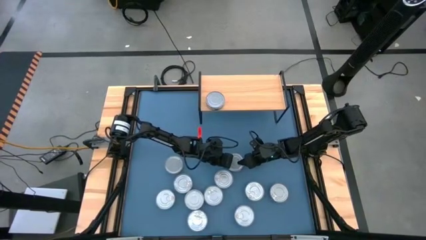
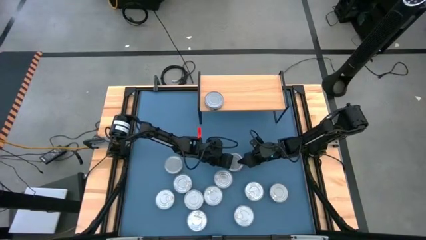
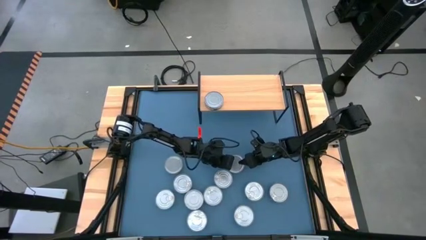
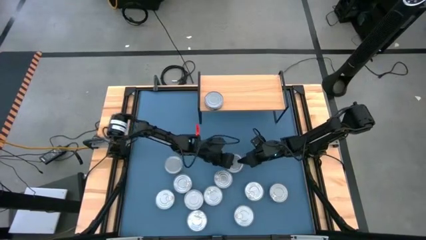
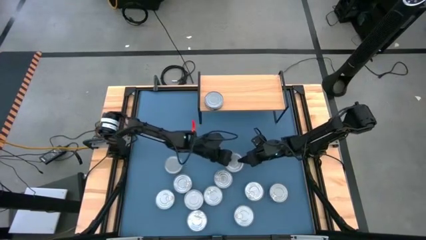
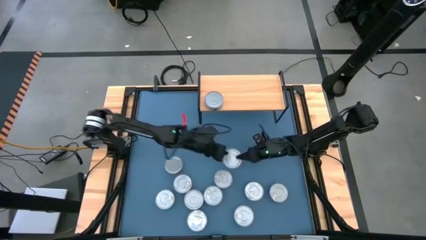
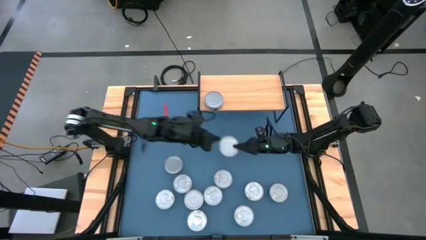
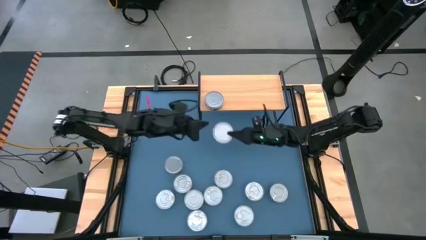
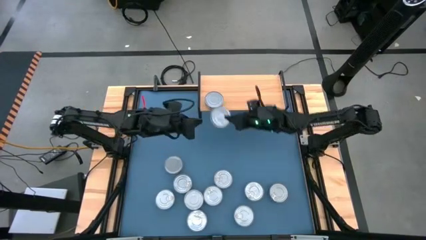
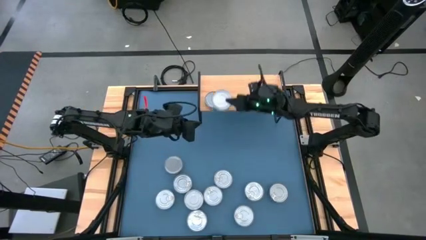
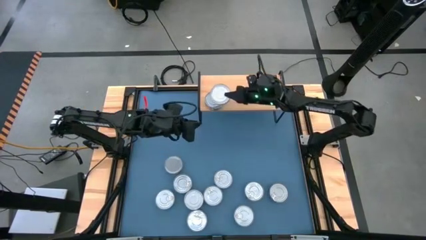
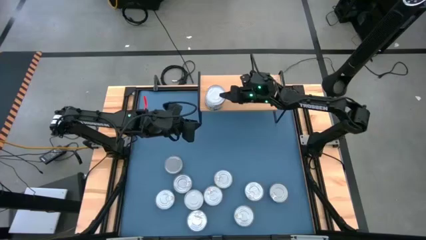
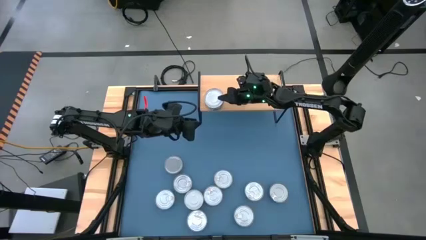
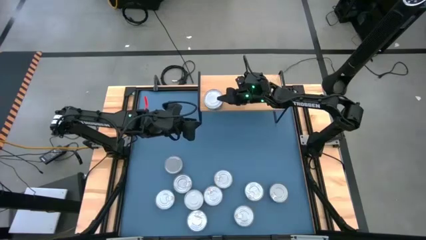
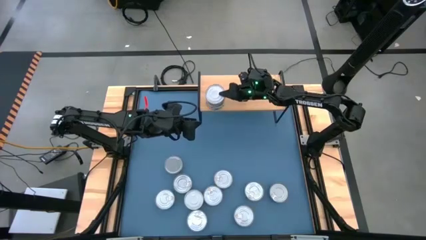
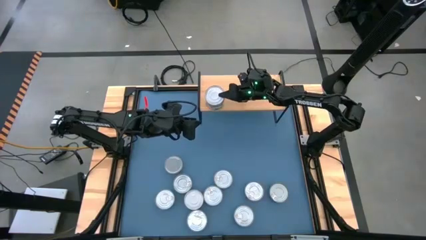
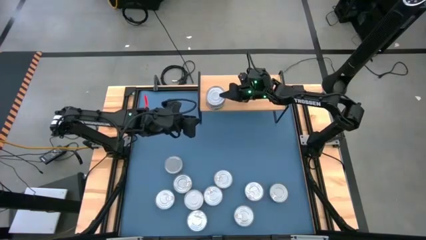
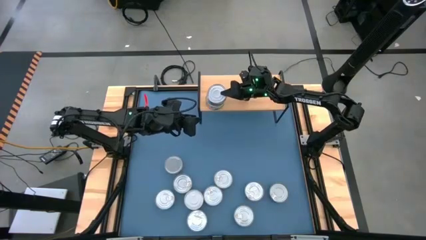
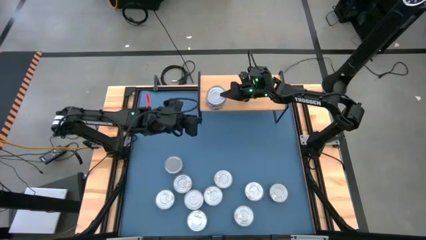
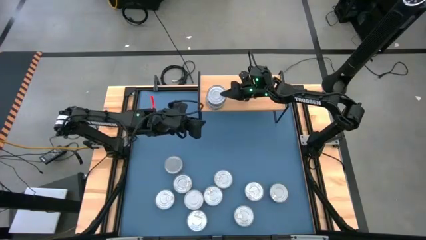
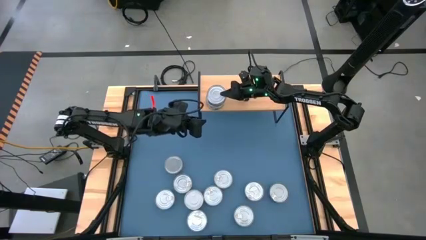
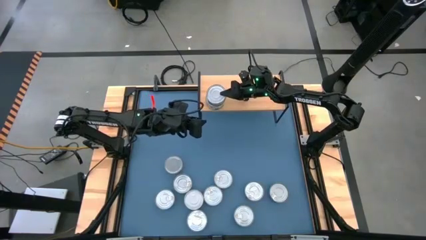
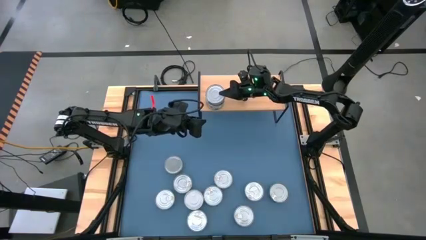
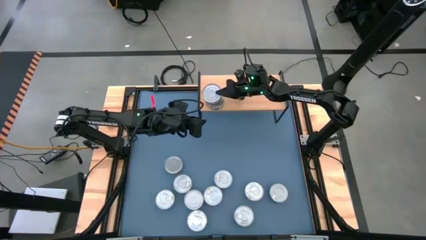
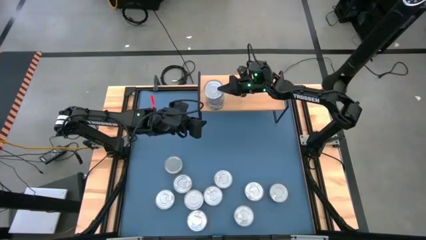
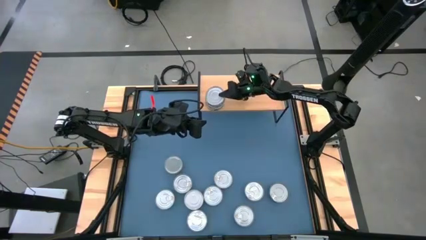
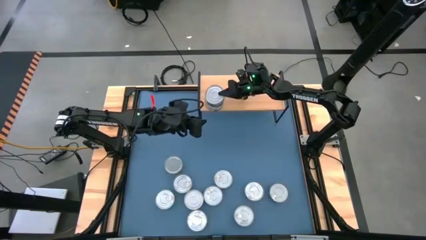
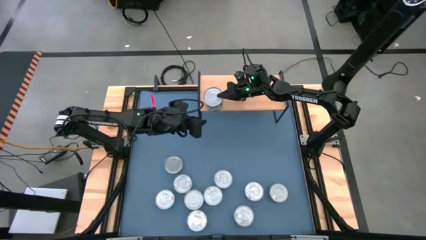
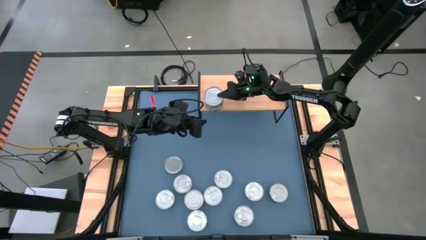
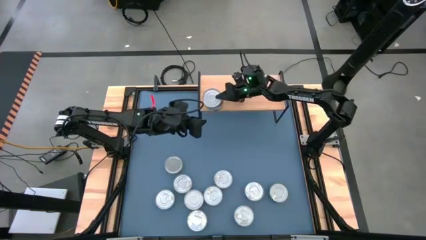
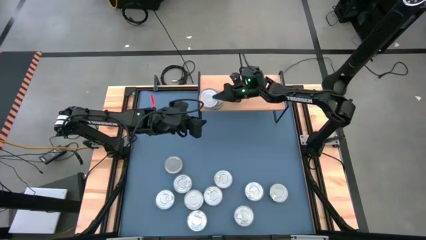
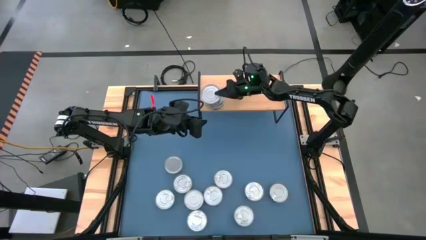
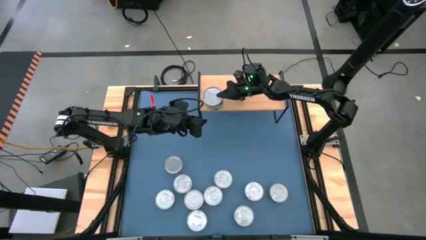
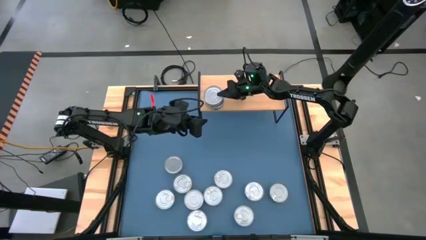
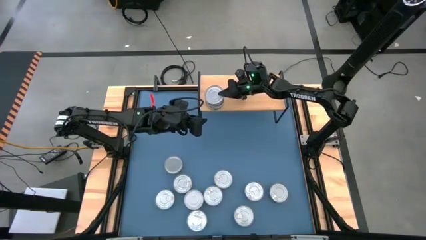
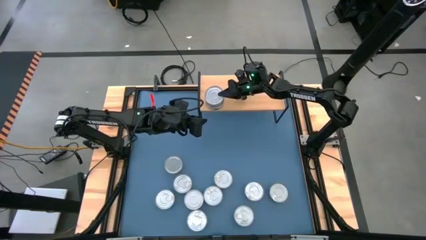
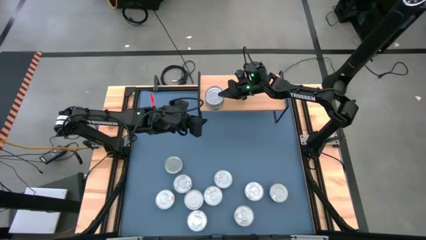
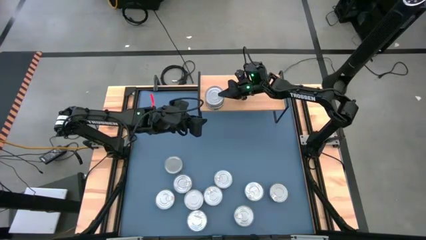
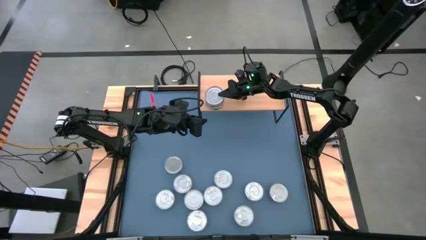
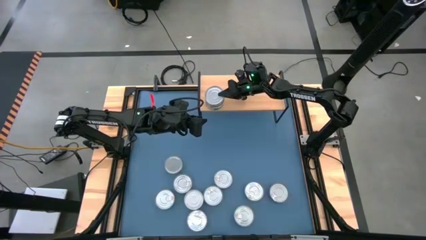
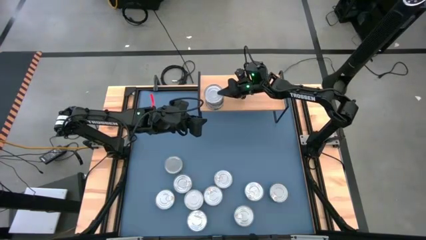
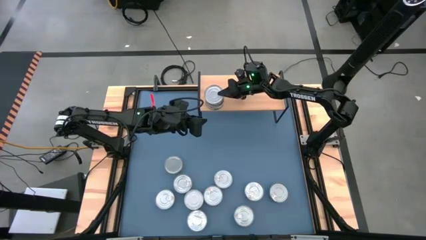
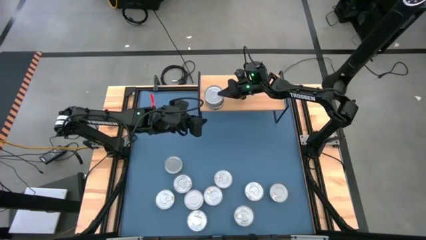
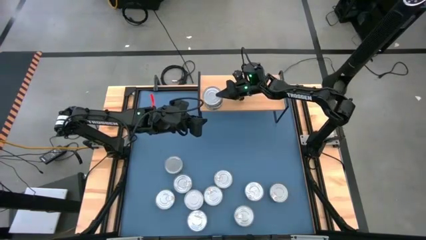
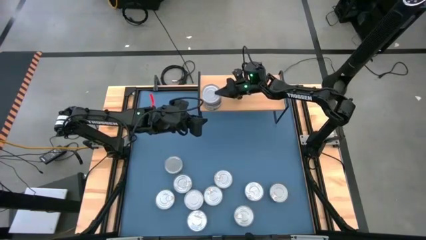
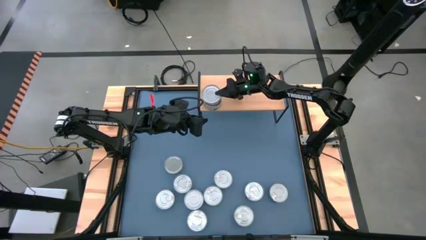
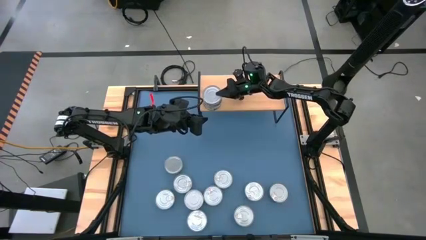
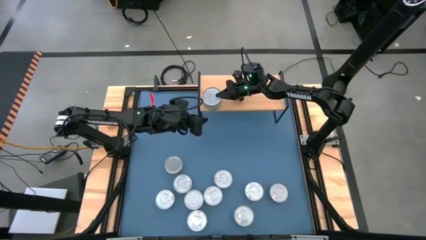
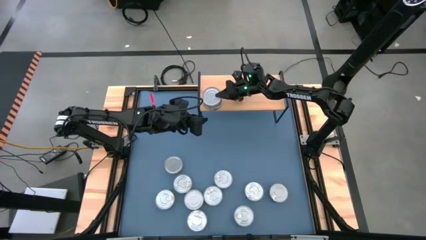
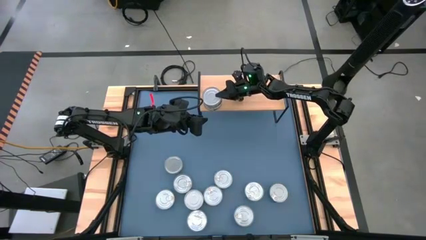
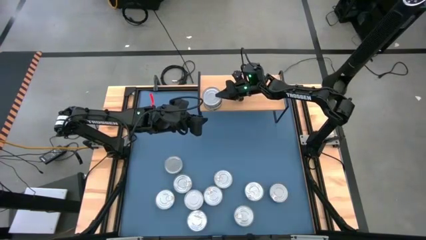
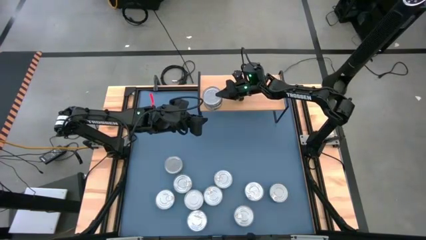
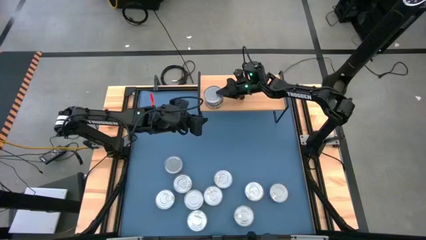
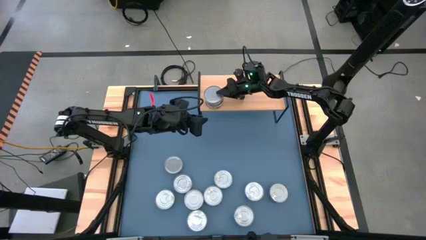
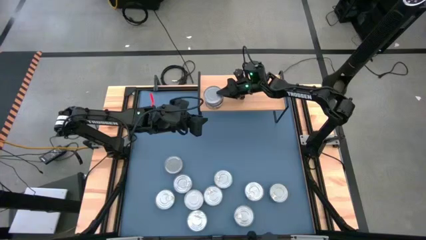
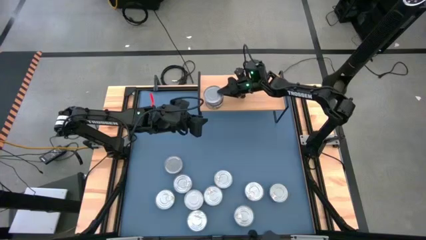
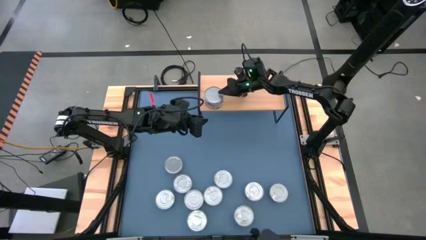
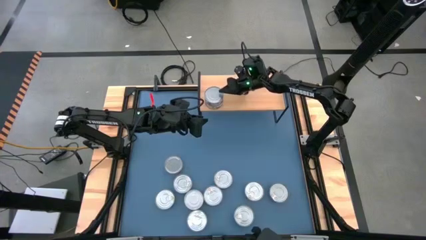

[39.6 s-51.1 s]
Task: Stack canned seafood by type on shelf
Stack the green tuna can on top of the green tuna can on the shelf

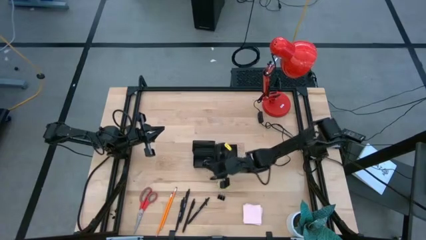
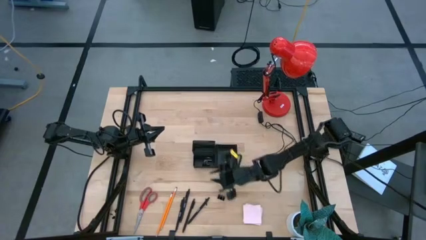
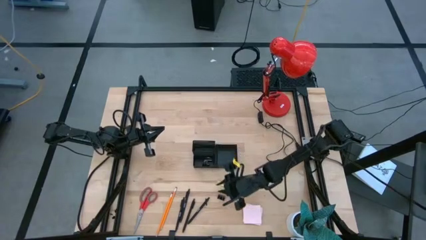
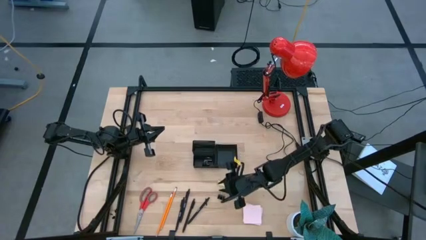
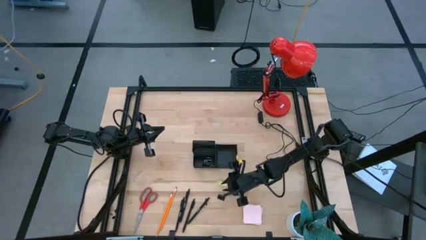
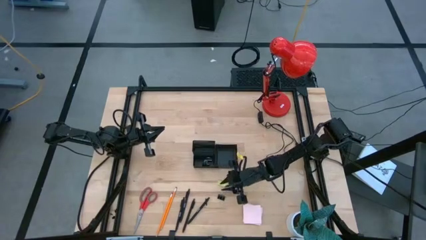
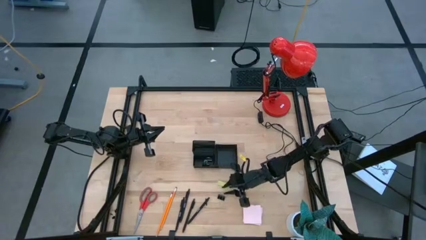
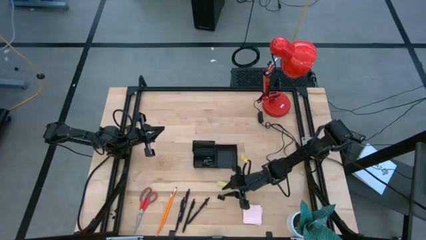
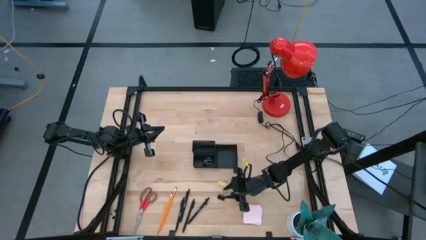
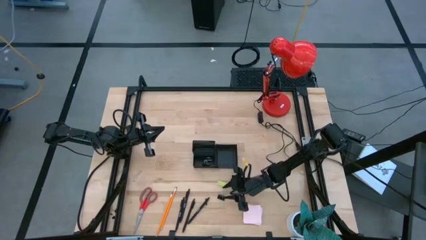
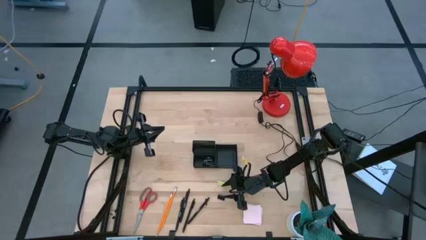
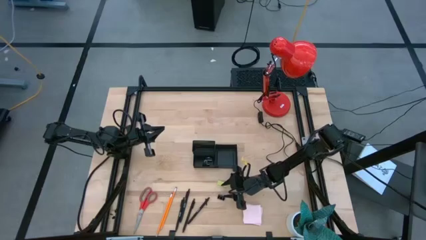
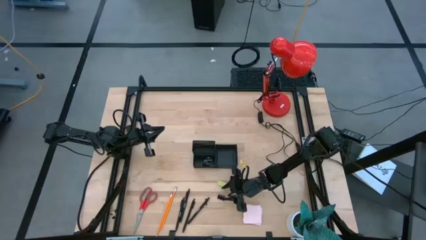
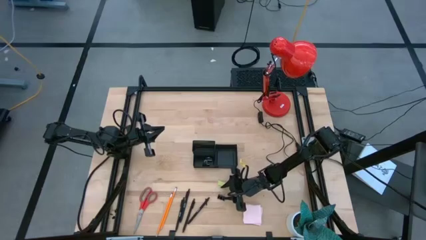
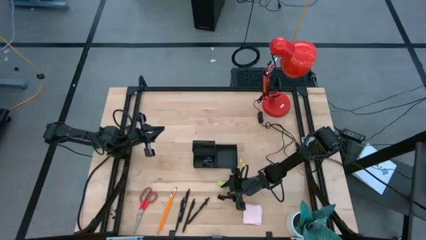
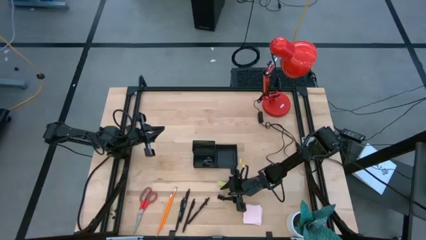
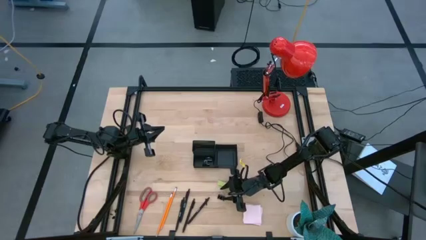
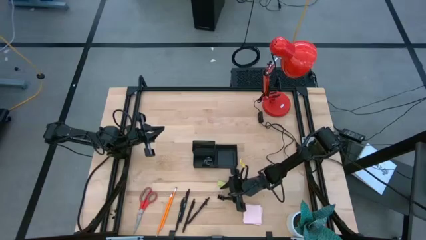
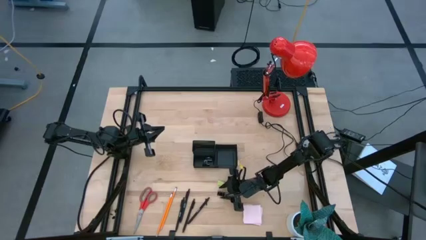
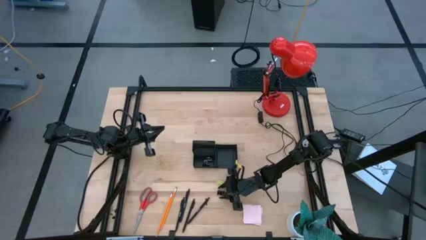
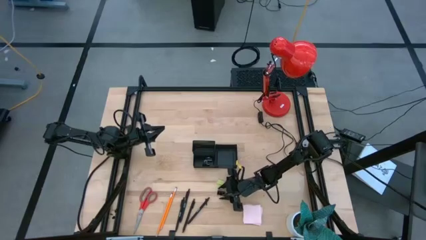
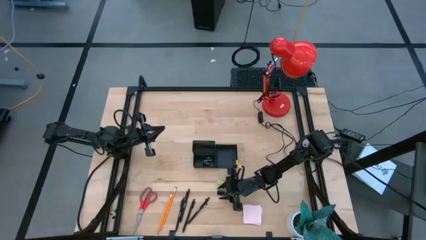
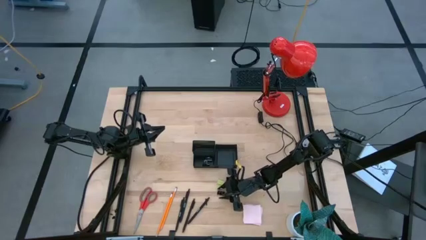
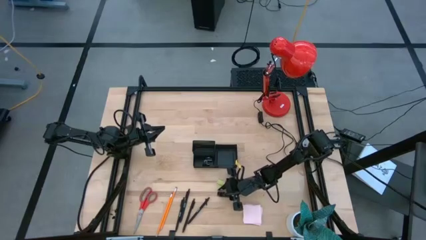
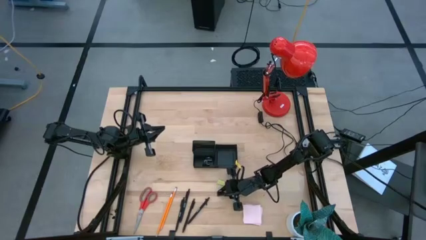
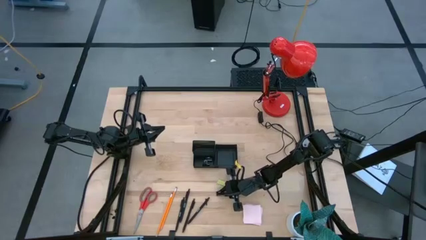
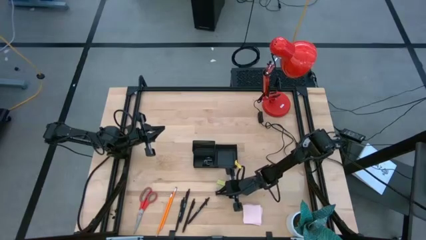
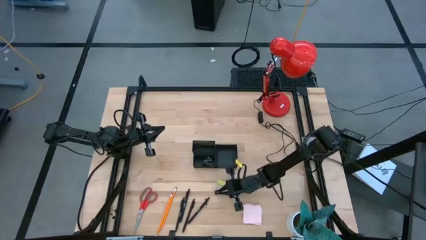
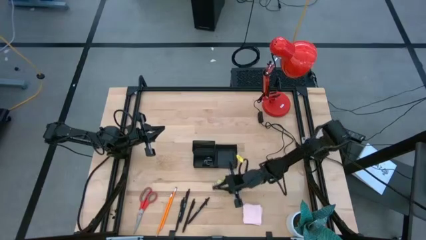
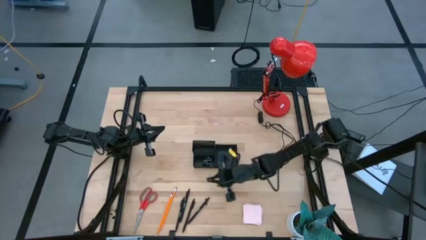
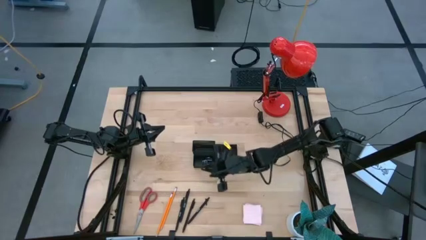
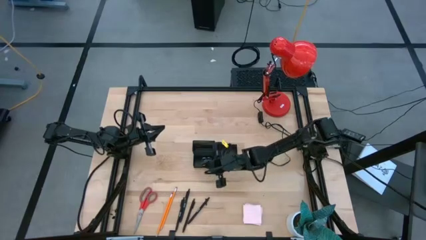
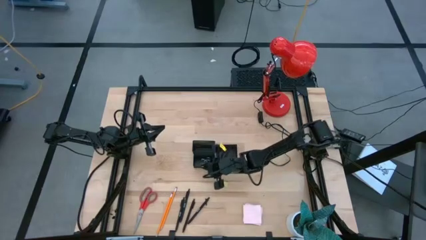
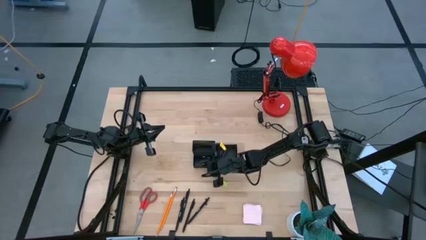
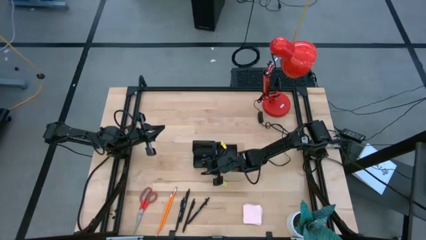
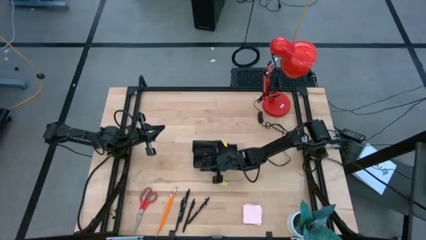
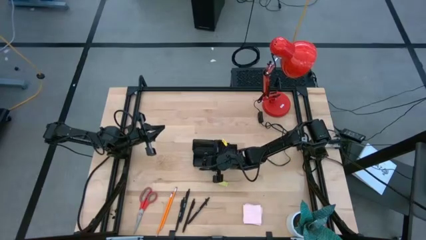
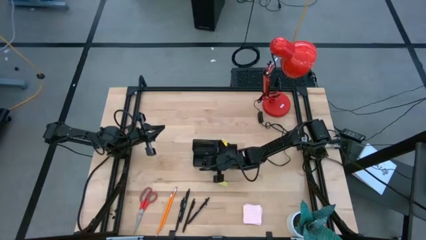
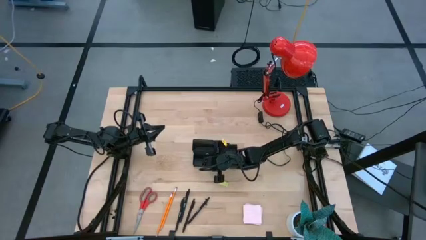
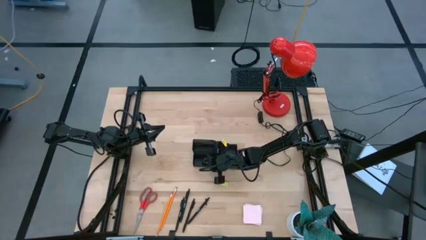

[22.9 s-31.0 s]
Task: Pick and place office supplies into organizer
Put the black binder clip into the mesh desk organizer
